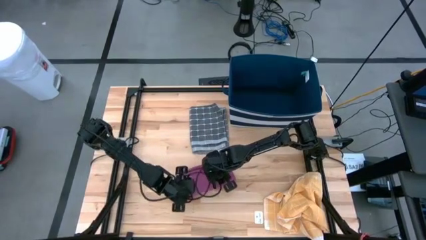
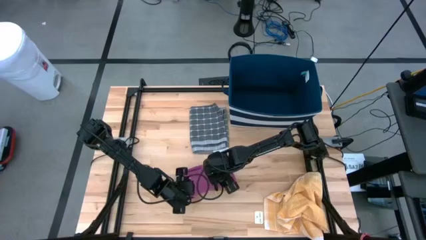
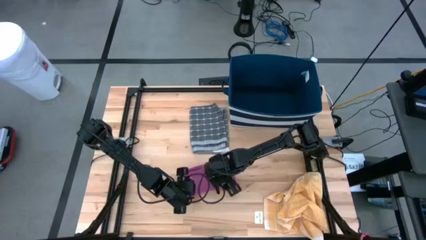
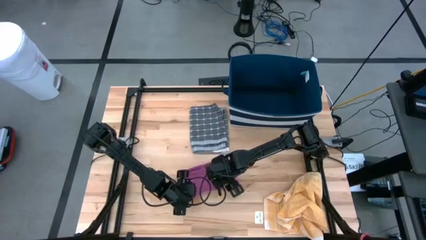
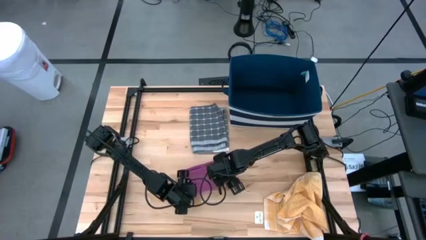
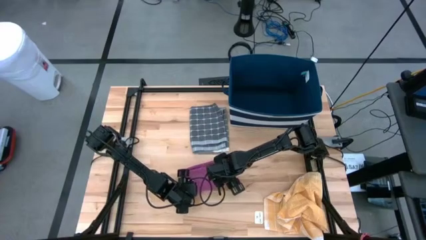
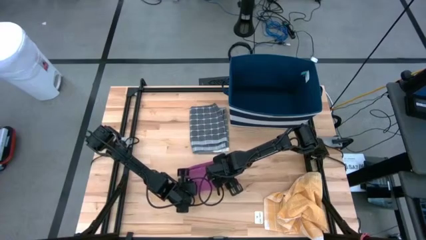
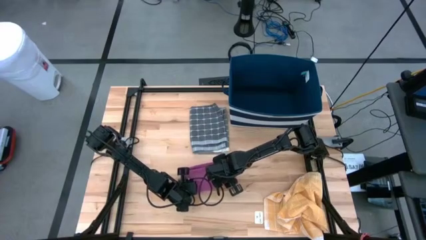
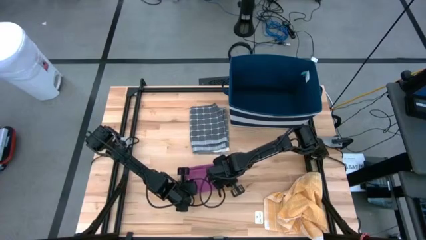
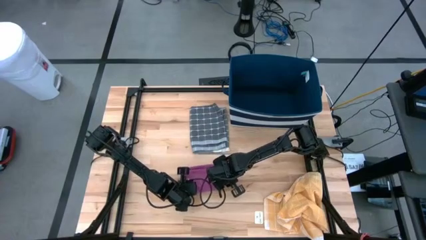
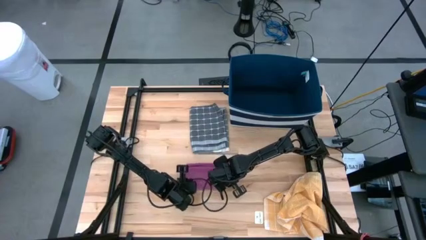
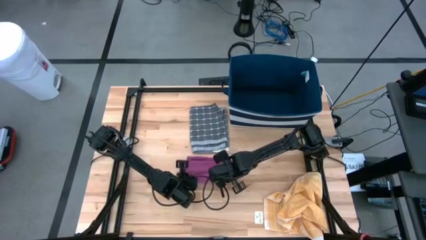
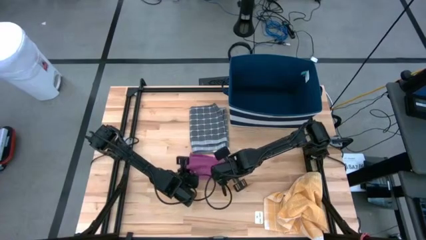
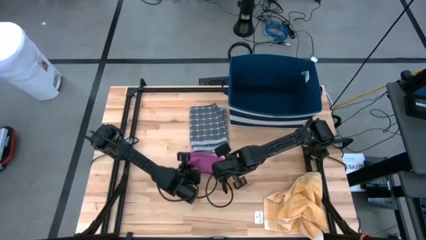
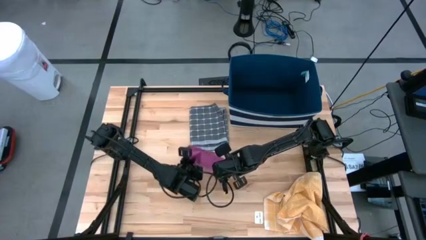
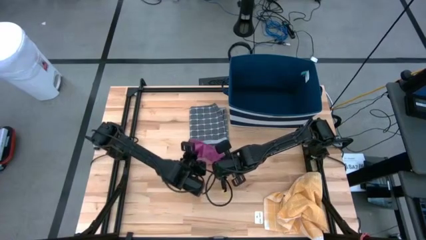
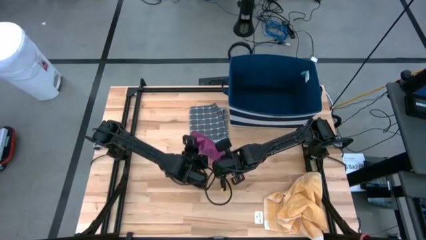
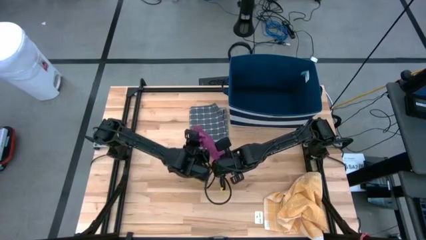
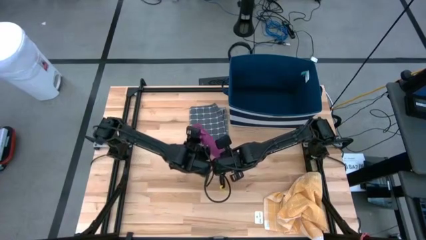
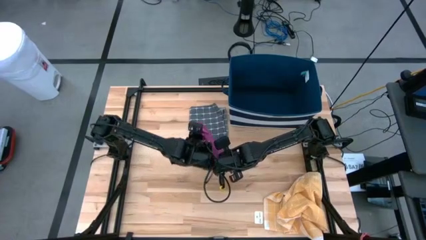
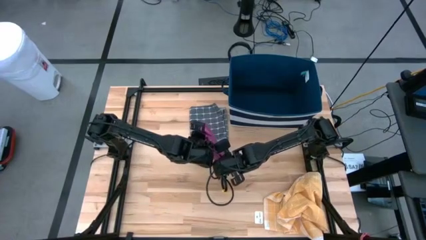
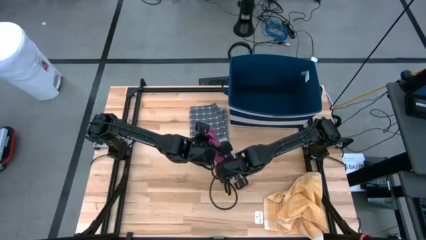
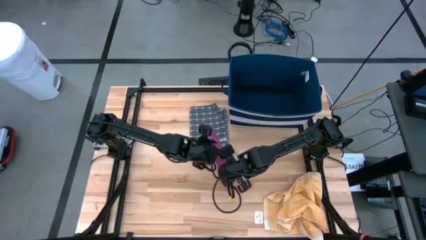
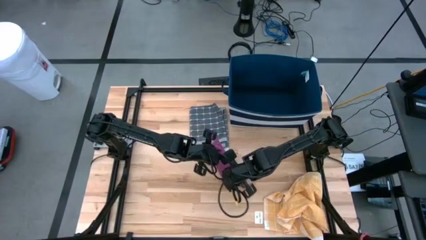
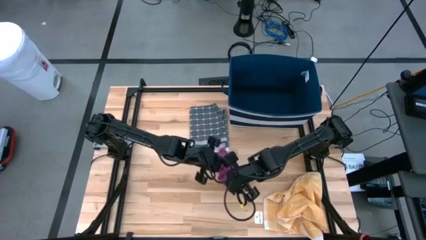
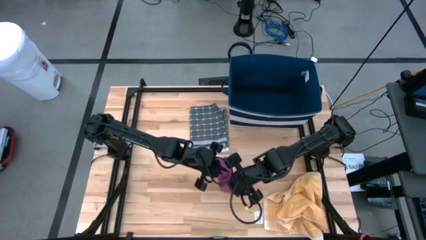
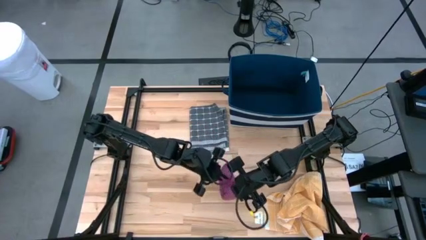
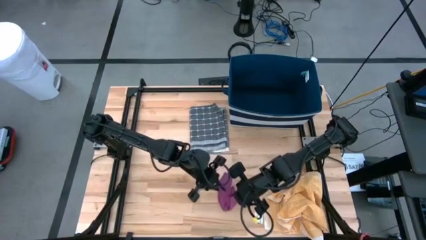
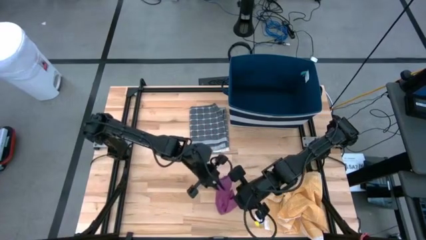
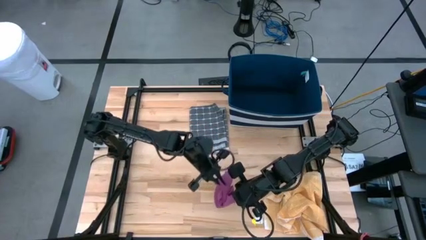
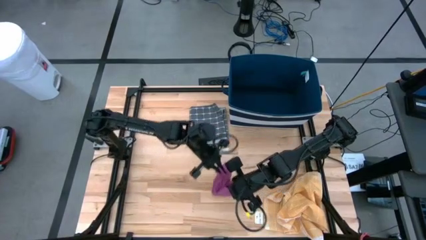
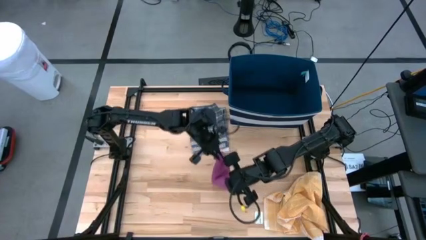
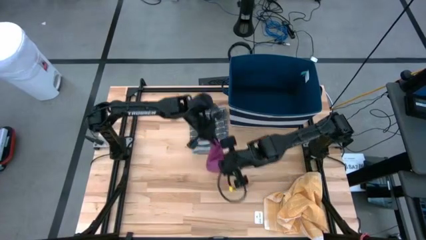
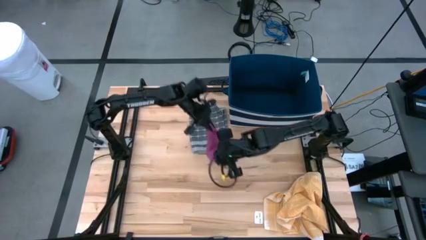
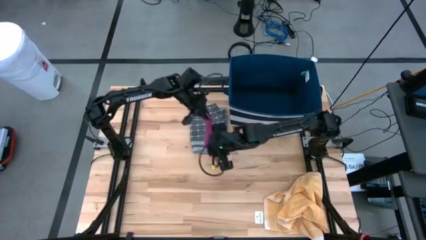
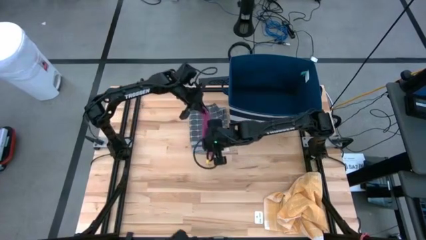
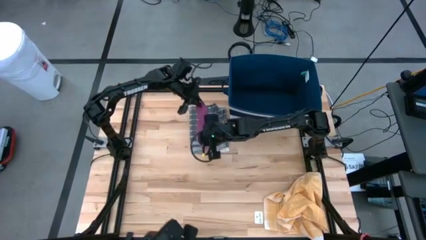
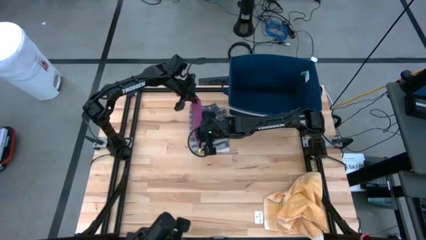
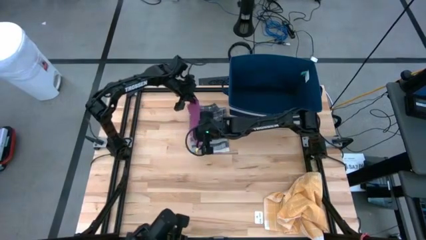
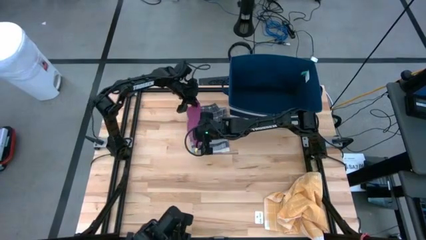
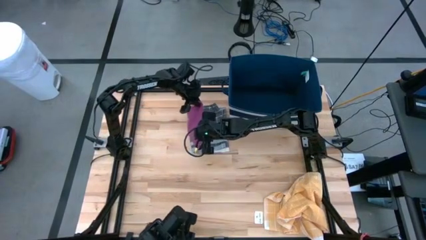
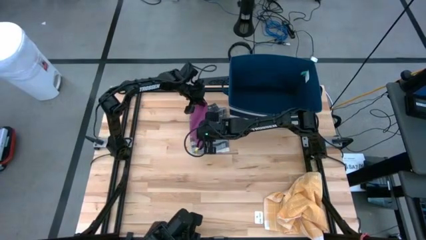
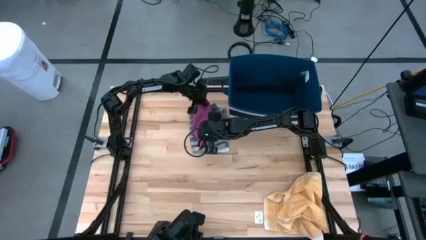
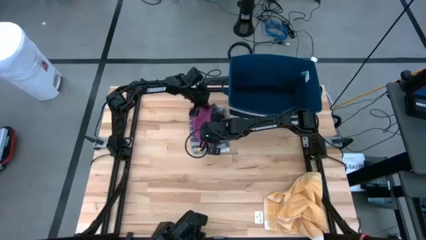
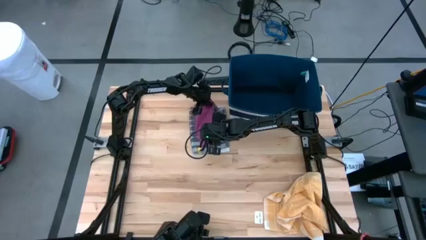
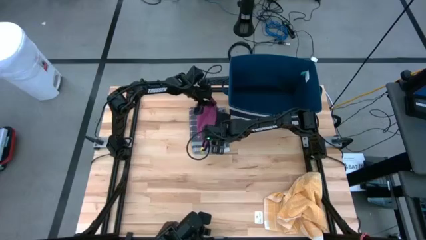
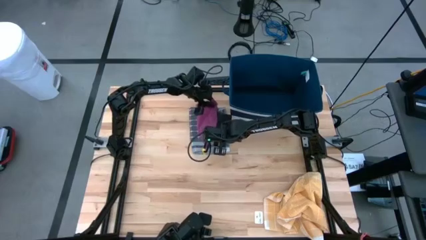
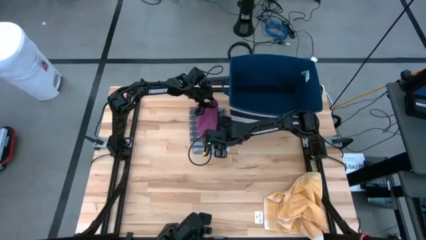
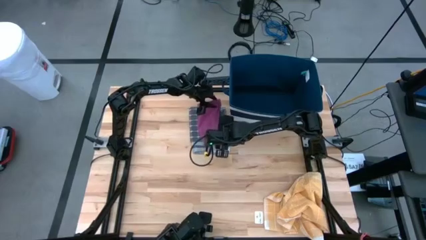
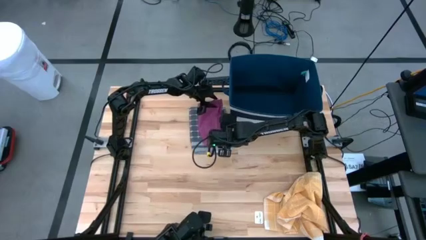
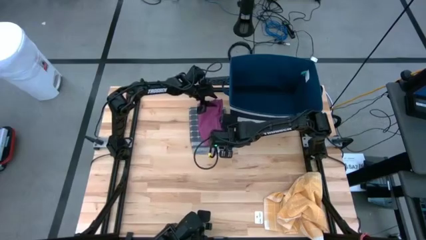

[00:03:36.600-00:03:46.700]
Task: Fold towel
Stack the folded pink towel on top of the folded gray checkered towel

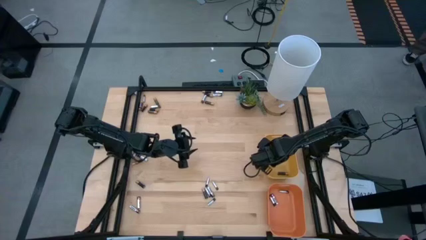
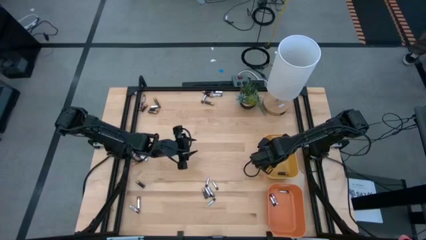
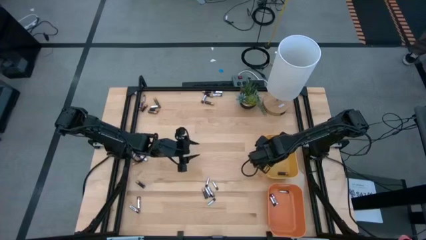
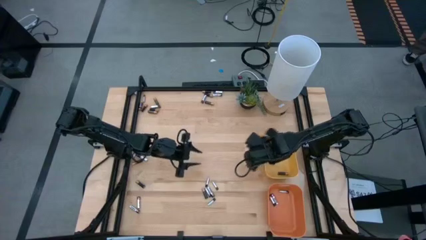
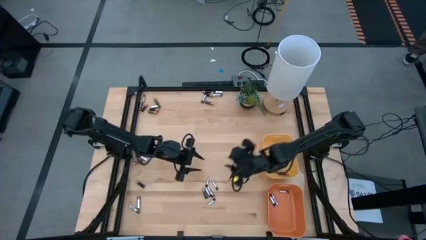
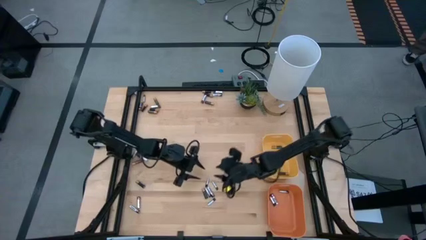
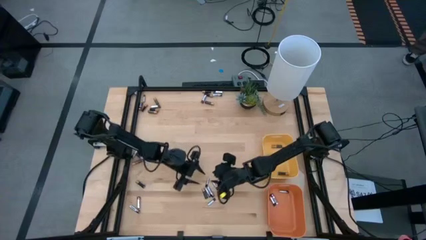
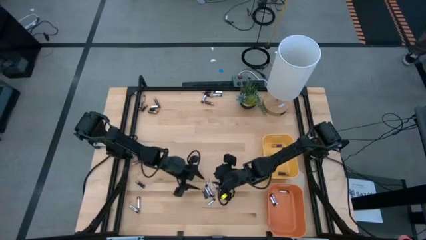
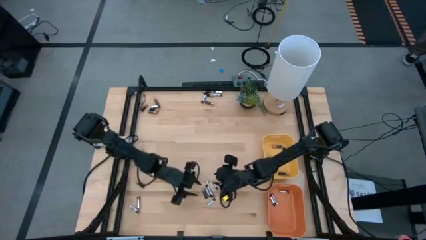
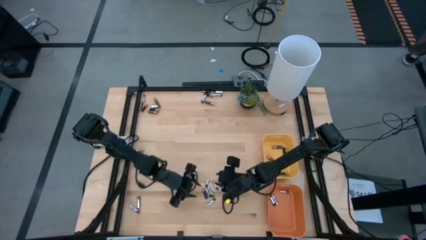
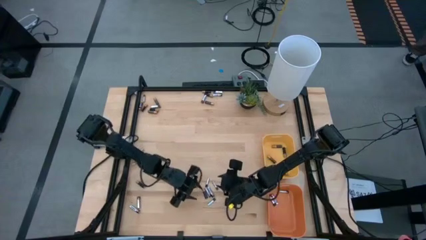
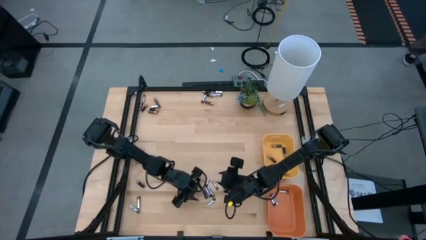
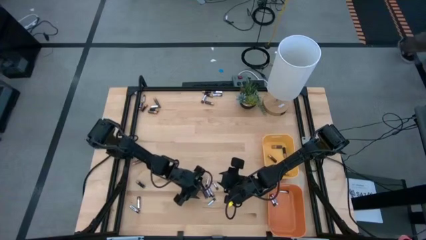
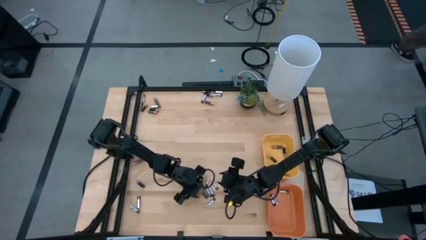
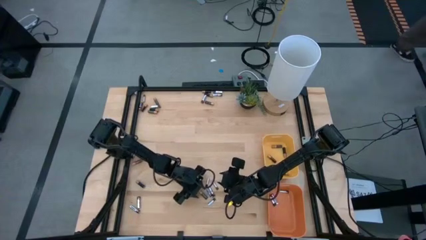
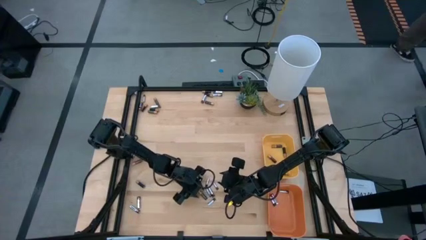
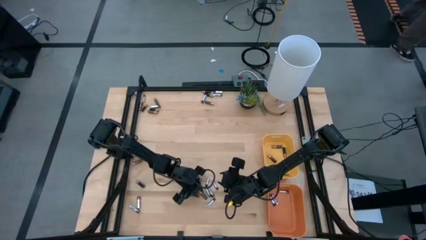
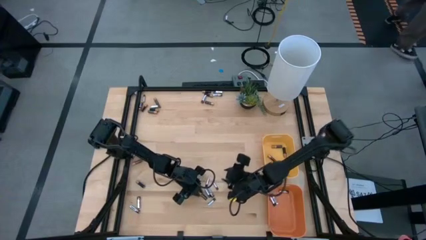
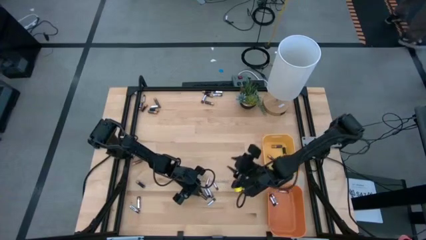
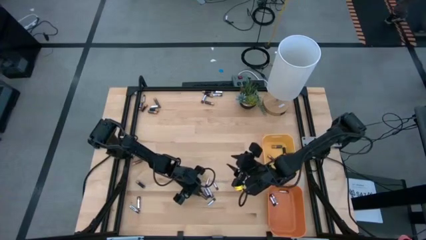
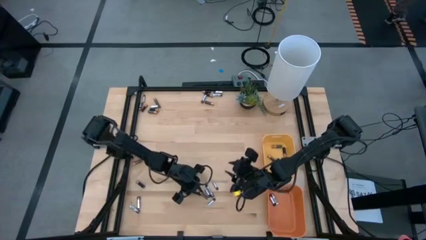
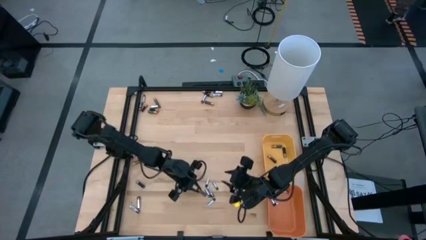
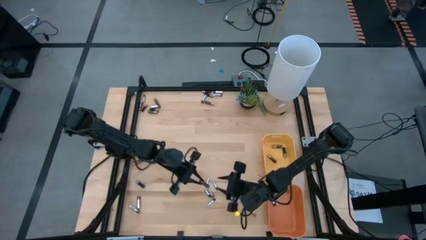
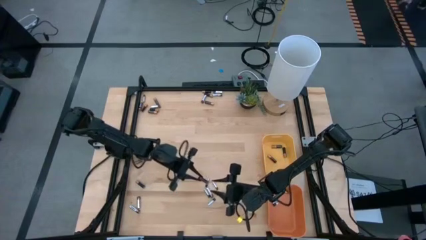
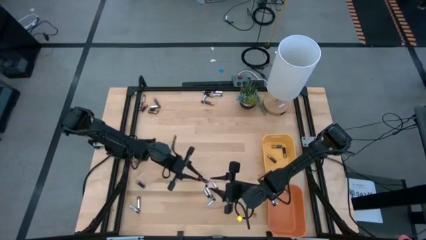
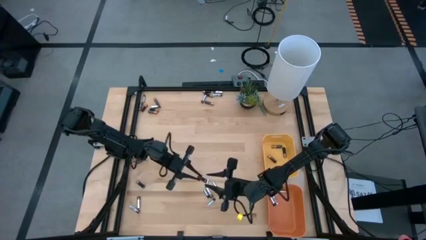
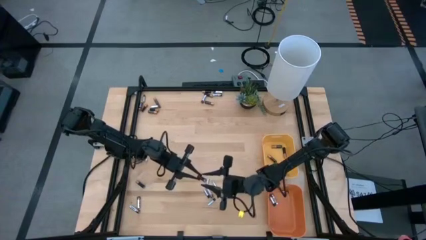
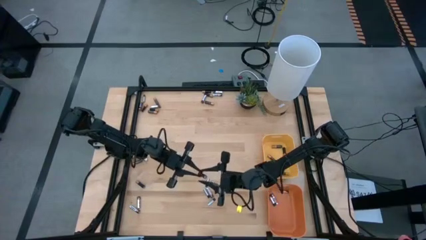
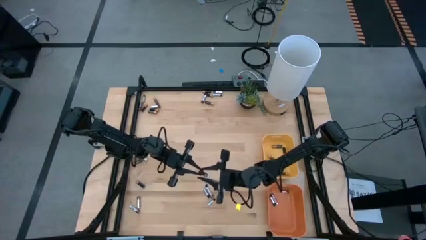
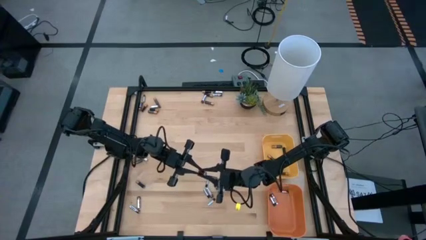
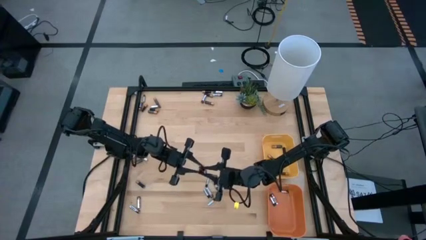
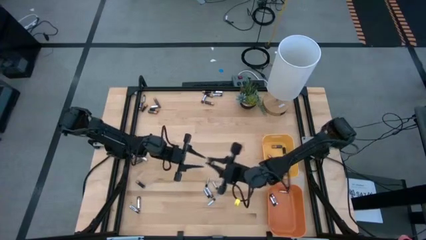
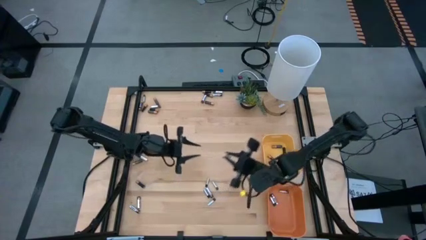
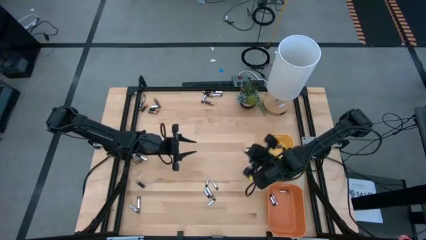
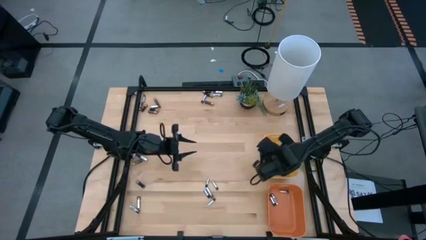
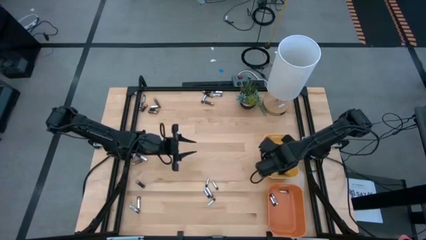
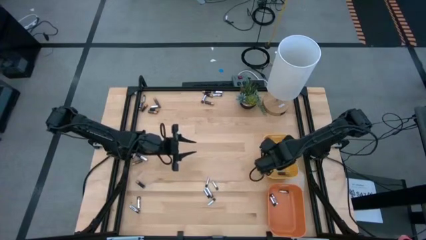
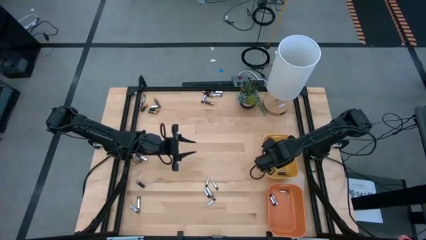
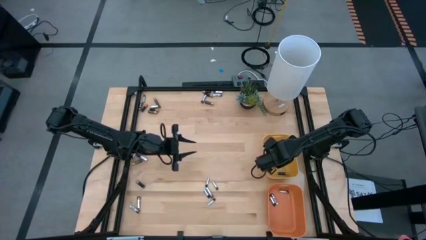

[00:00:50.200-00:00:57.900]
Task: Sort batteries
Put the brown battery into the yellow bin
